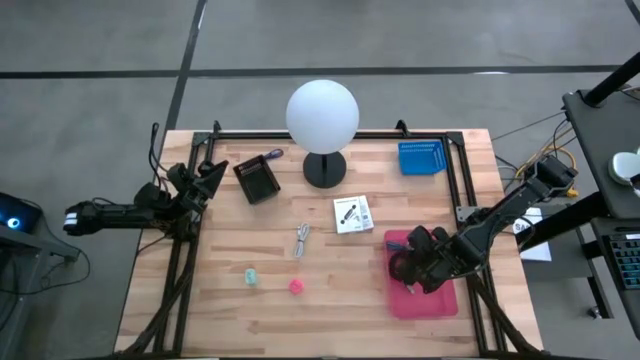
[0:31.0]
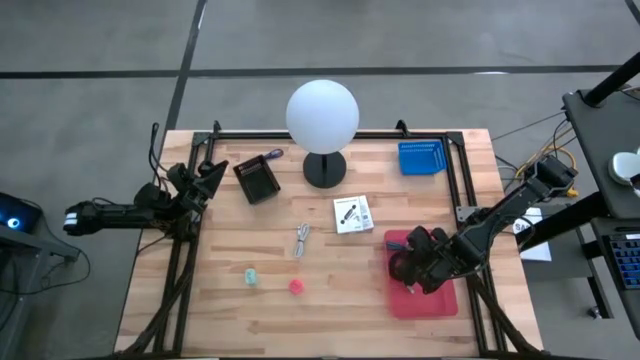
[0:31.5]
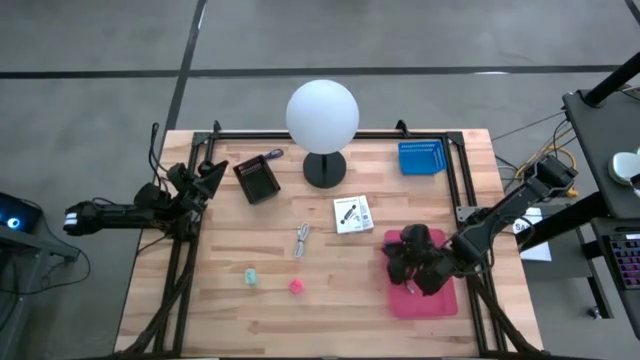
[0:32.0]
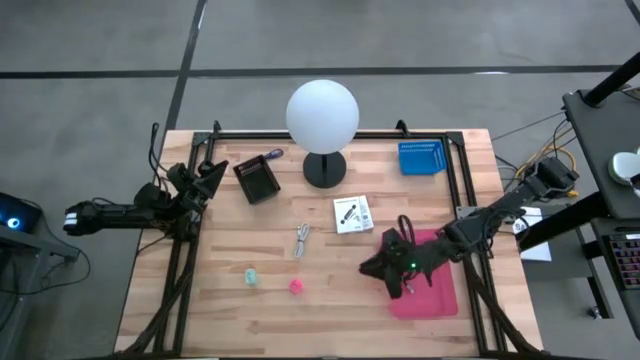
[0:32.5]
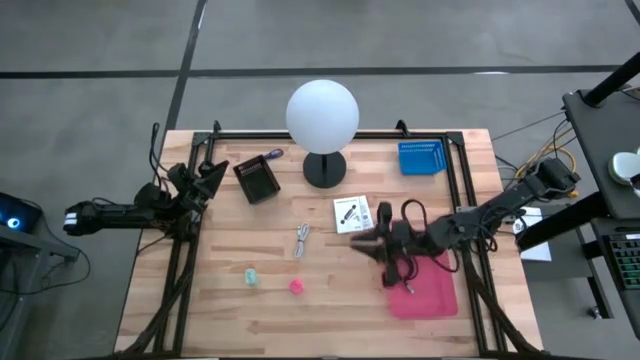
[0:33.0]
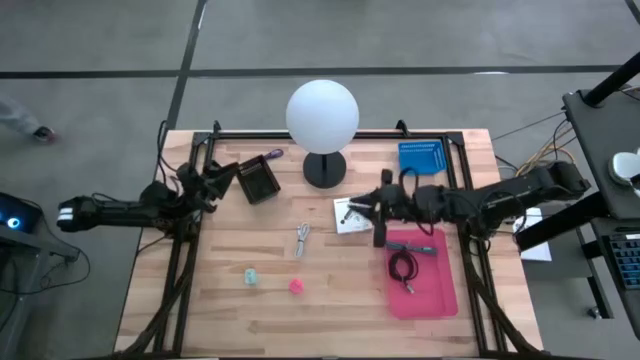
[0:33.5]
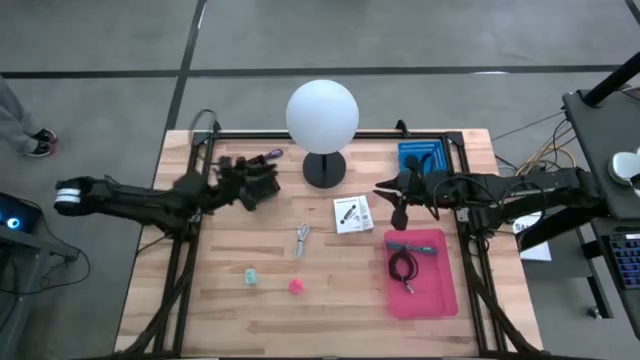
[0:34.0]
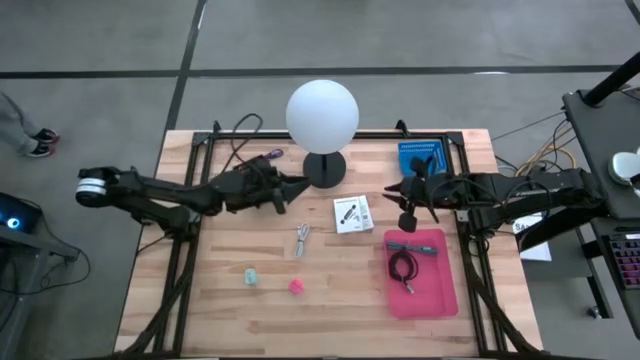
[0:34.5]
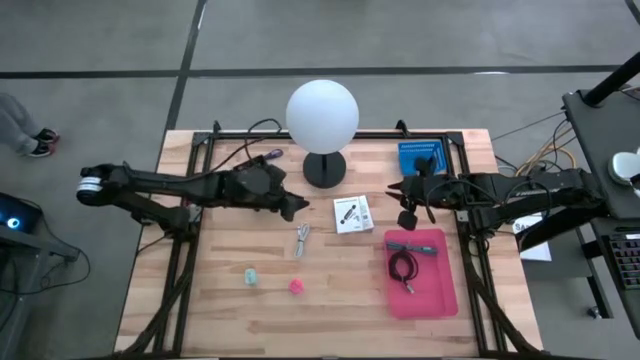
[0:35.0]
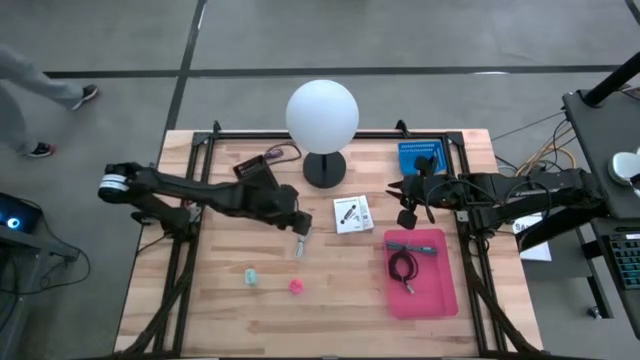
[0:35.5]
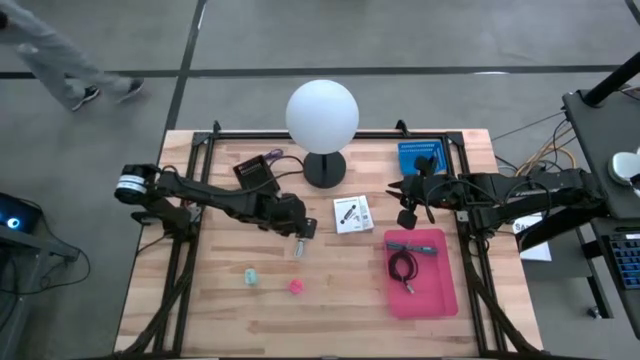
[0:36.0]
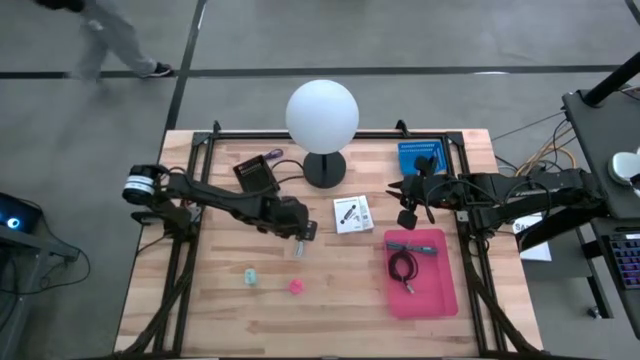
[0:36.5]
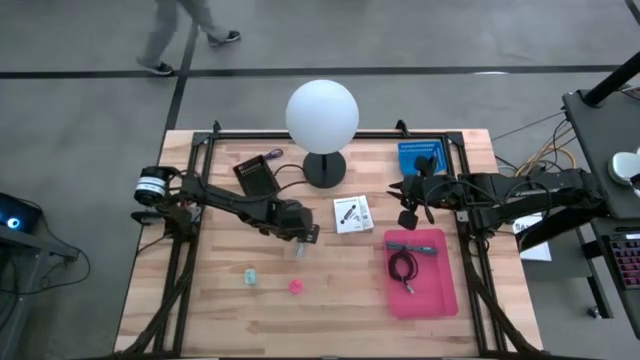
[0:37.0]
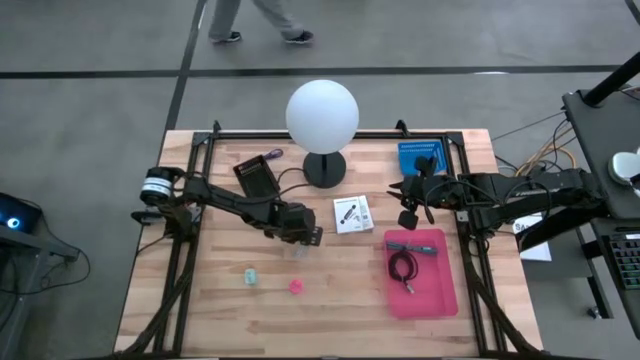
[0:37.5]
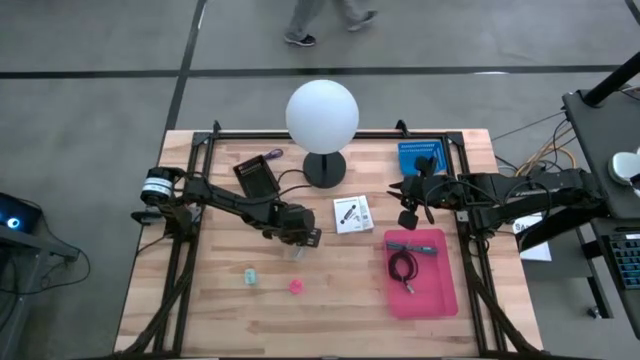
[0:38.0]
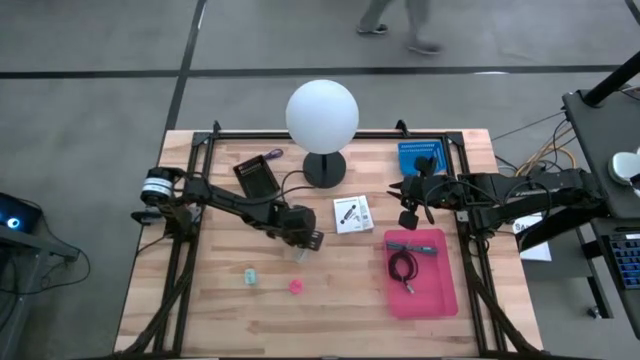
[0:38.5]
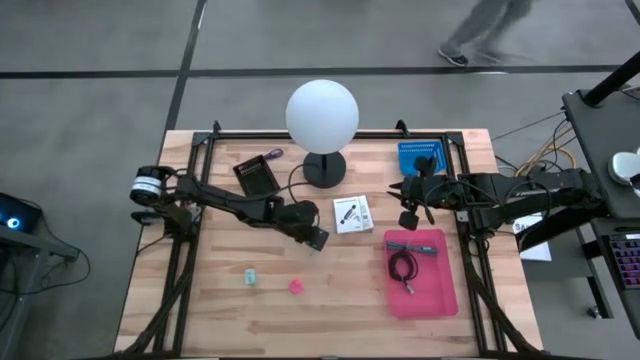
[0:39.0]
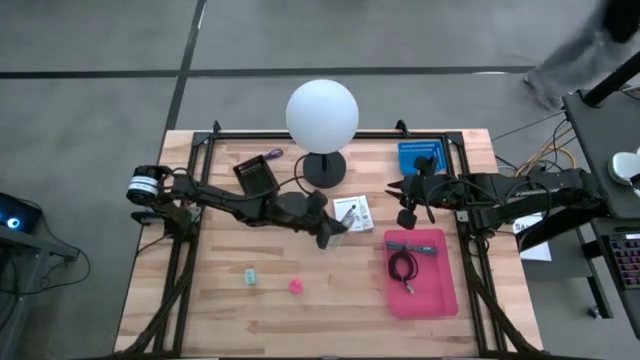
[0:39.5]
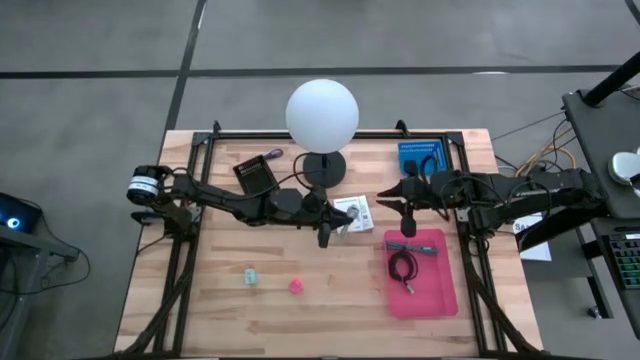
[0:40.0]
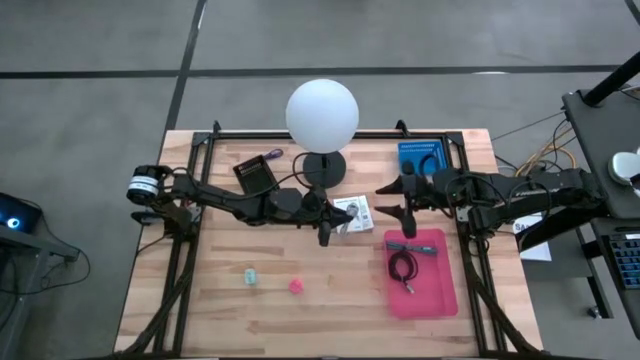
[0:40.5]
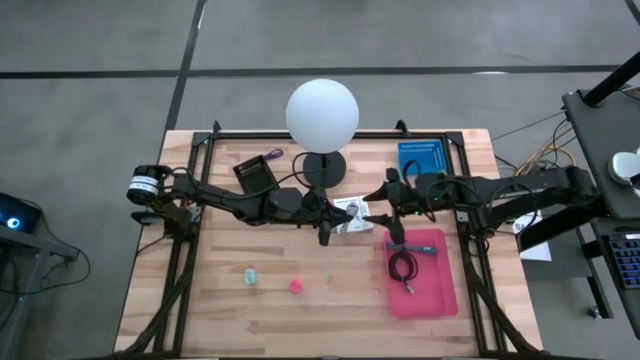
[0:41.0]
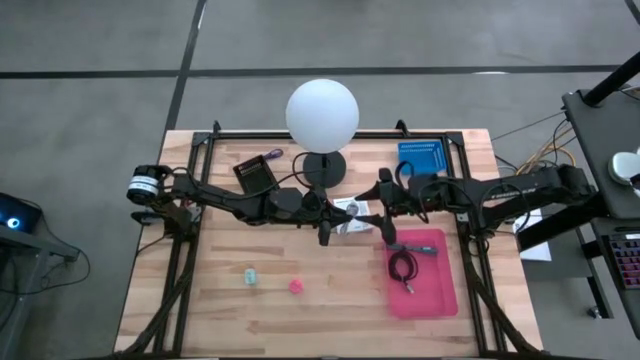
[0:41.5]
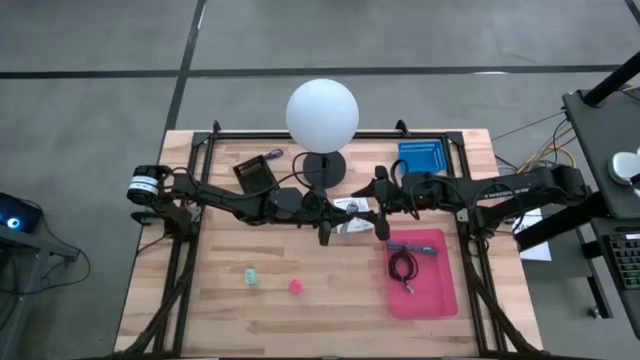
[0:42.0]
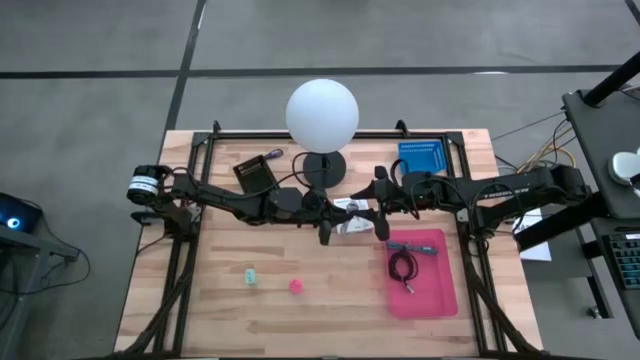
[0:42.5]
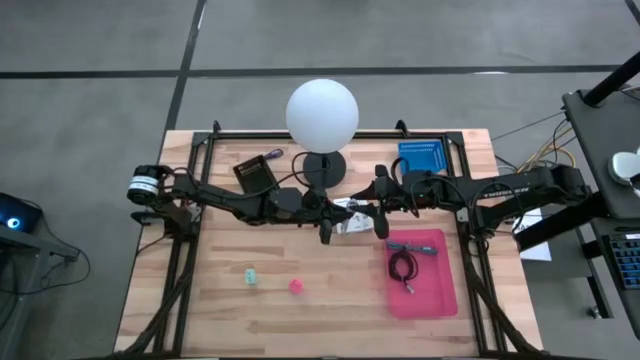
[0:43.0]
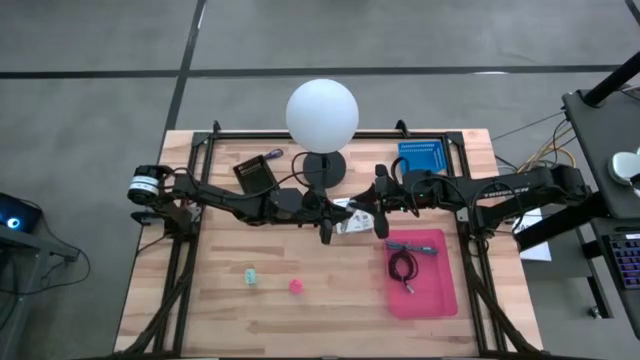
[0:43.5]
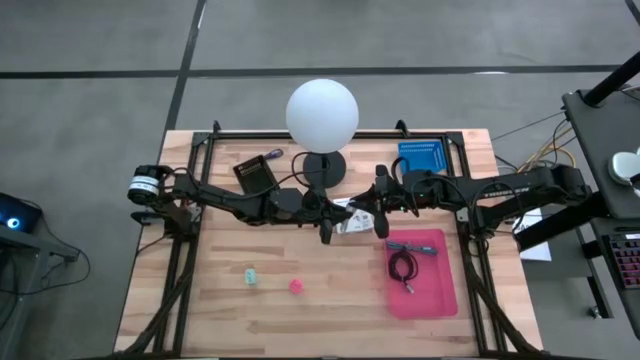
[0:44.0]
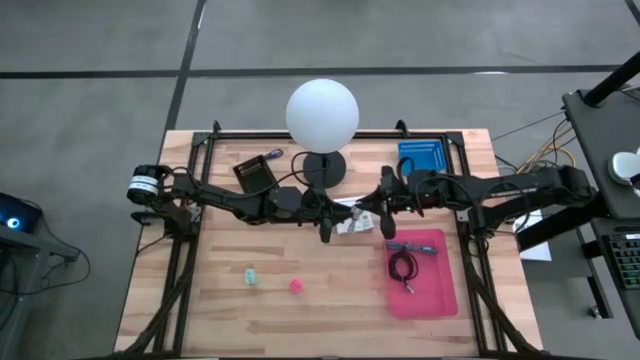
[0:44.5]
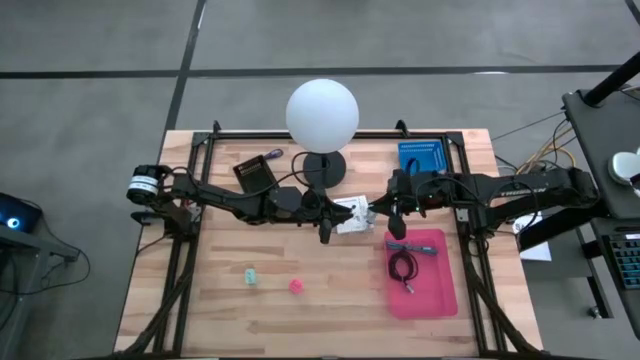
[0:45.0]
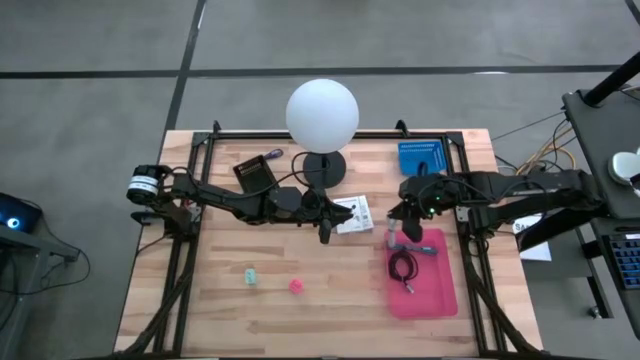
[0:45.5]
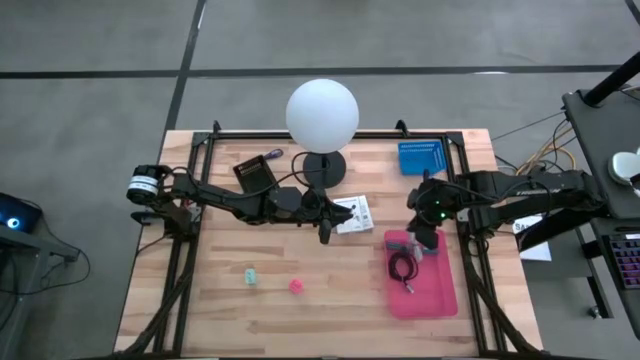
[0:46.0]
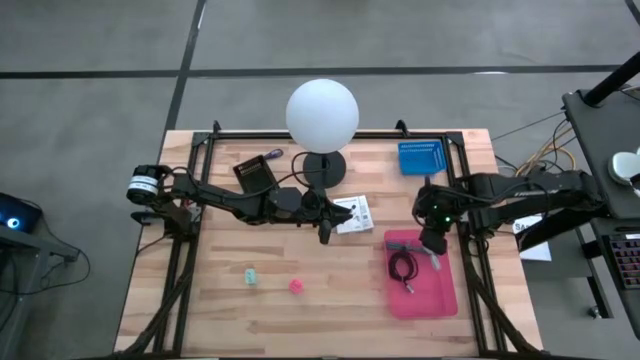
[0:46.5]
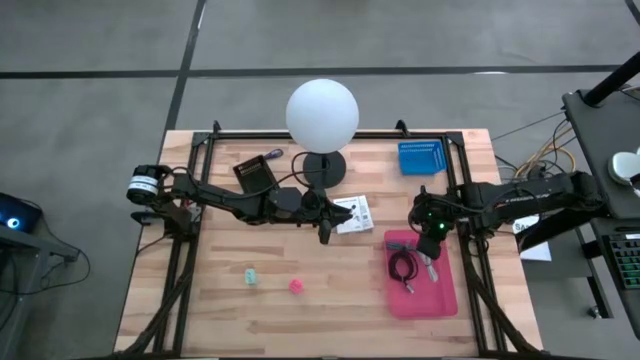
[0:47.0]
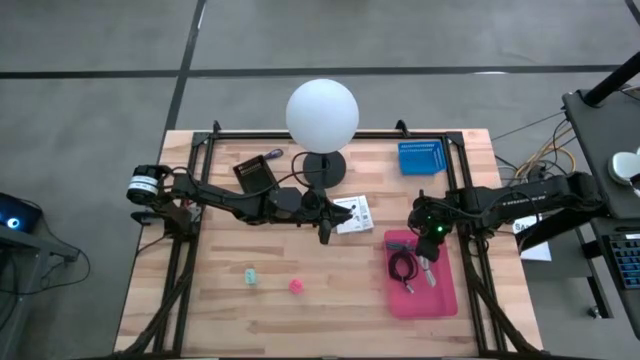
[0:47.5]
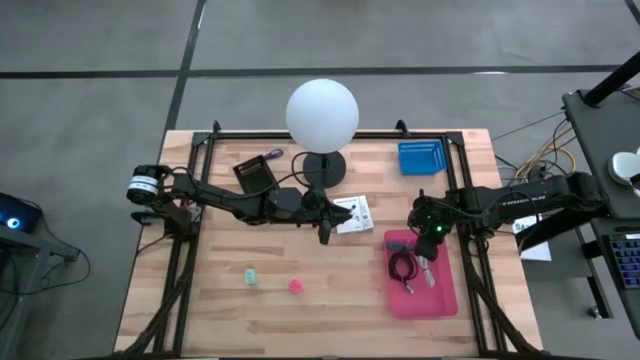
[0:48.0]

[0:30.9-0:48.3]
Task: Pick and place items into bin
Put the white charger cable into the pink bin

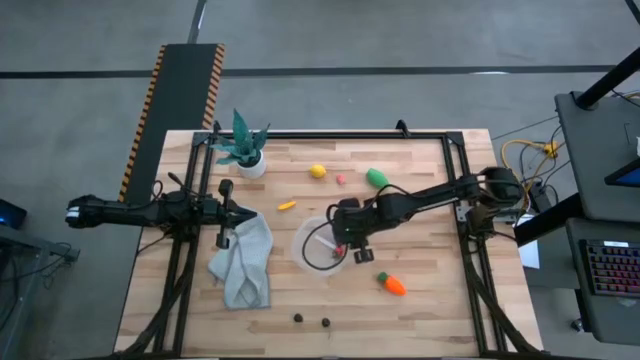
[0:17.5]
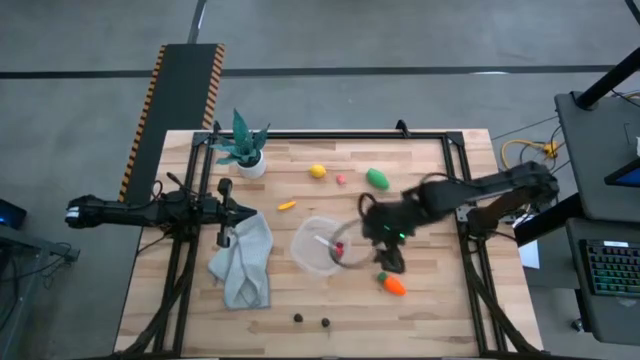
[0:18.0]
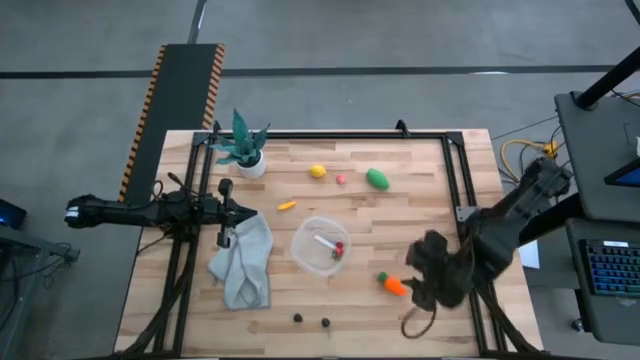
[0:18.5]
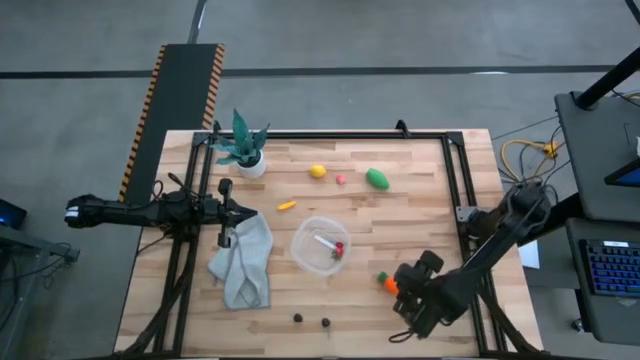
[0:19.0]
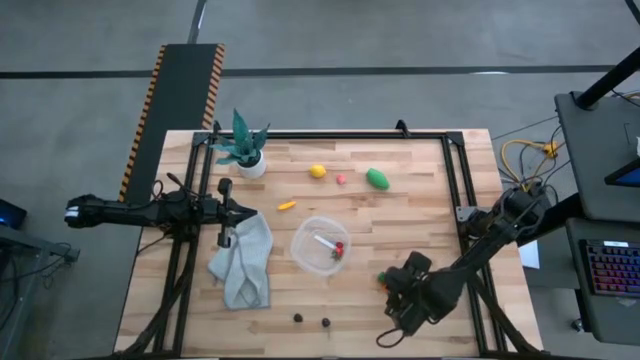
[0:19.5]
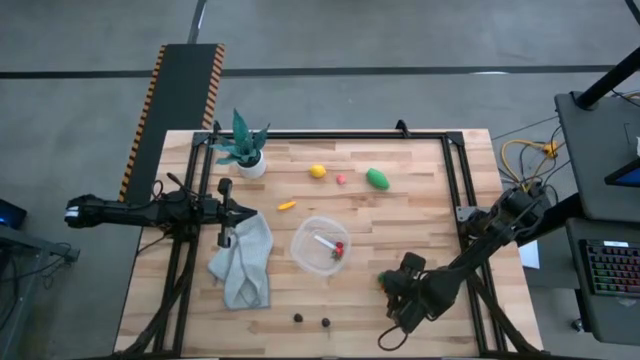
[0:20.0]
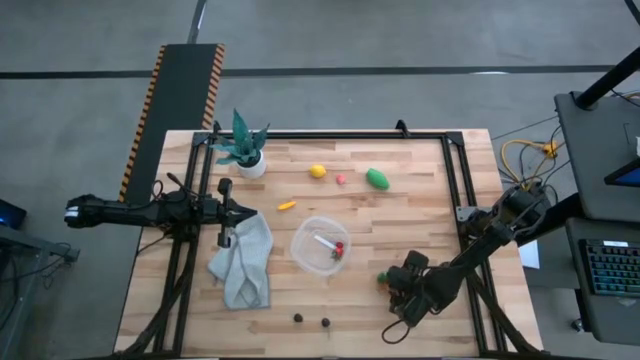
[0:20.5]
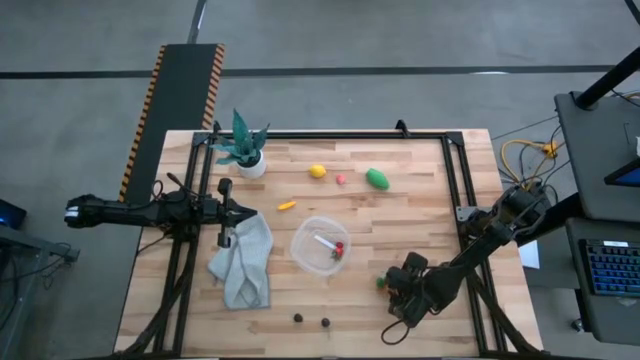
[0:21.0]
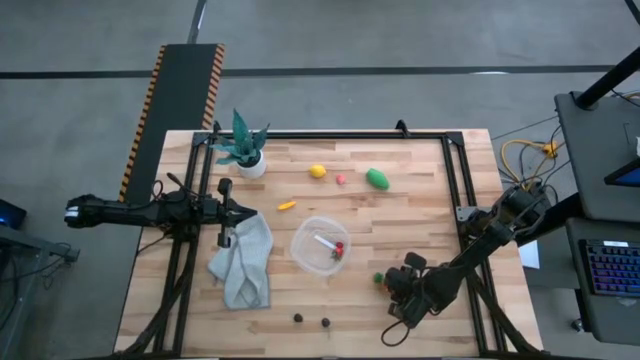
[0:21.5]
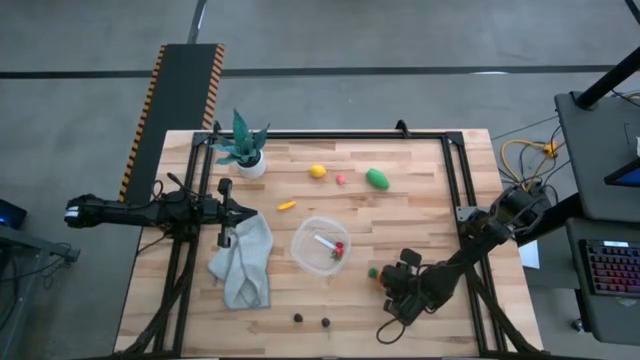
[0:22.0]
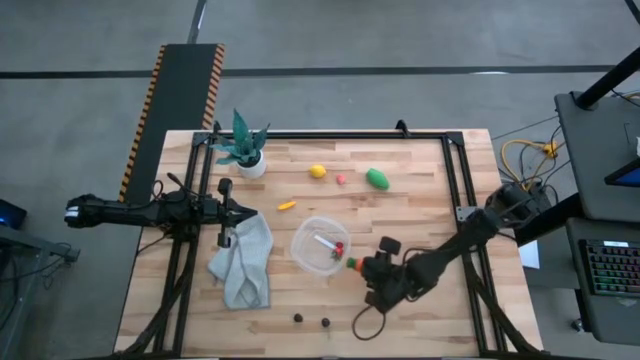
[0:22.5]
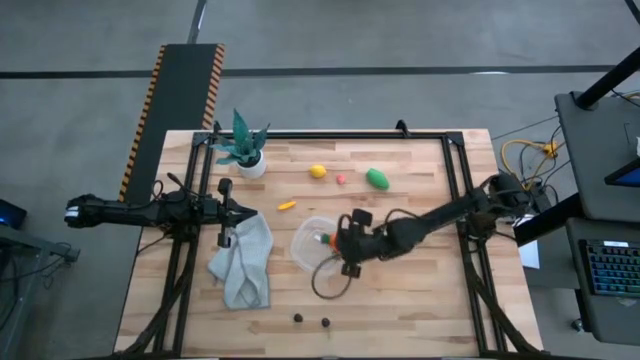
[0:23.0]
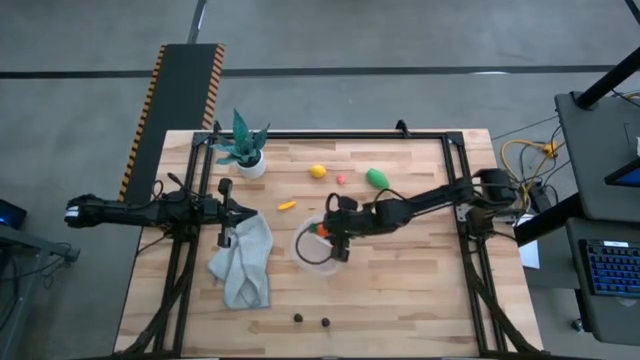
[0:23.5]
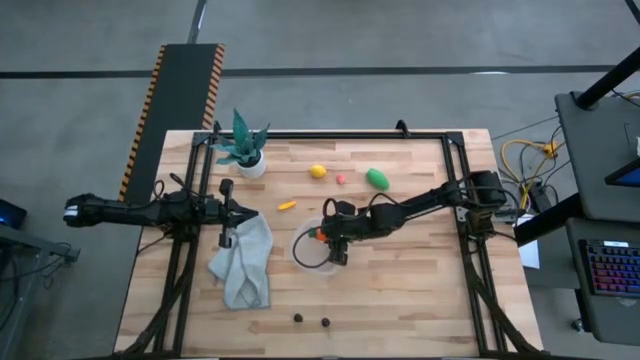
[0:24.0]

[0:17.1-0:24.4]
Task: Pick and placing Produce into tupperware
Put the orange carrot into the transparent bin
